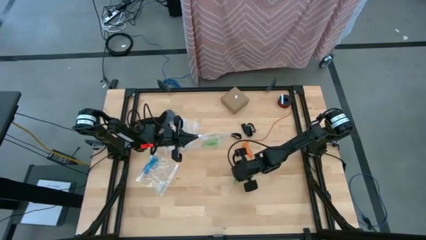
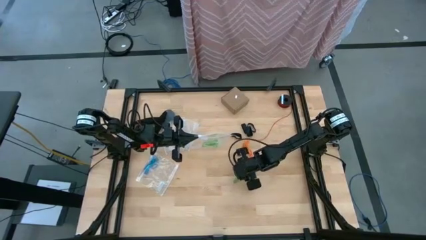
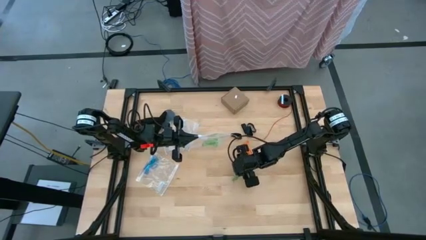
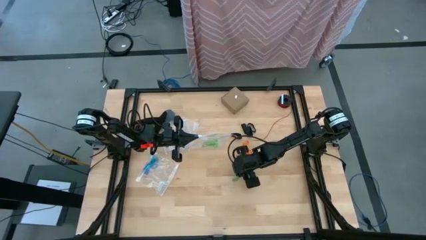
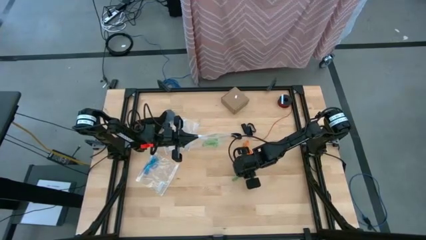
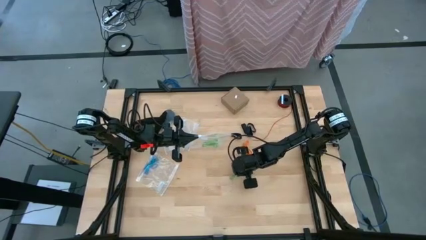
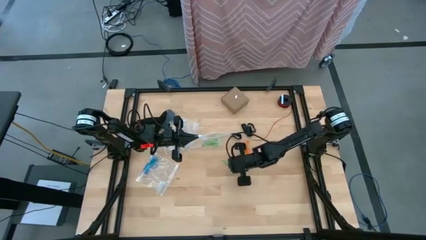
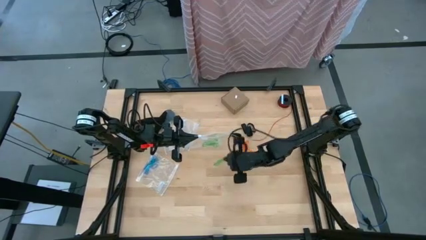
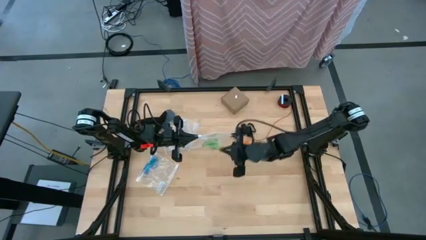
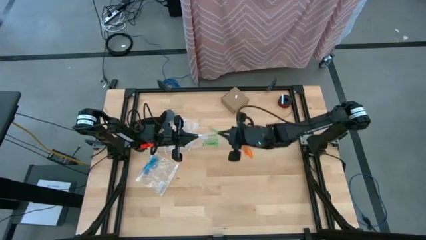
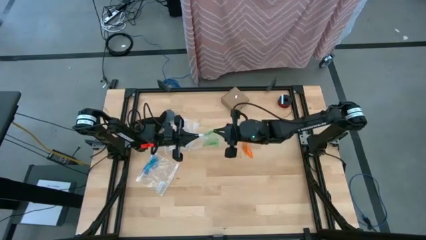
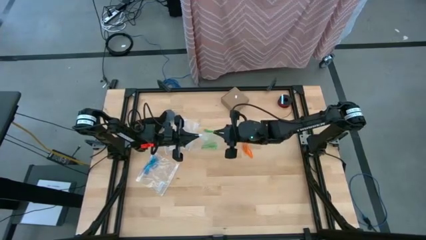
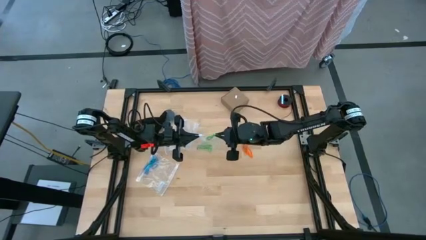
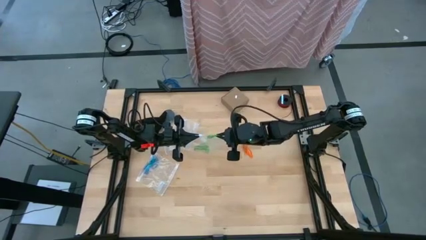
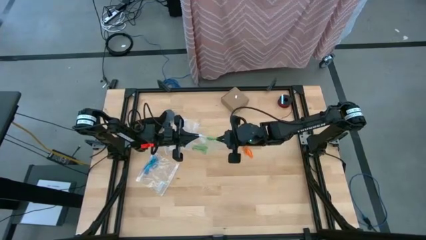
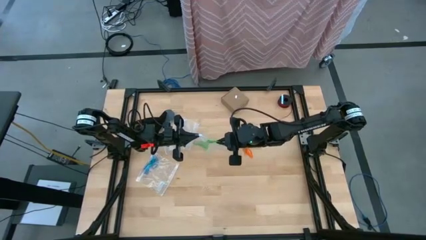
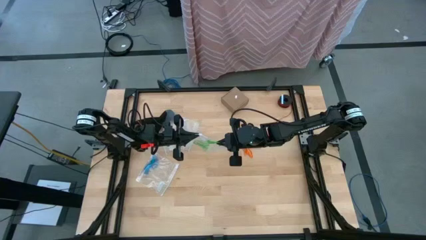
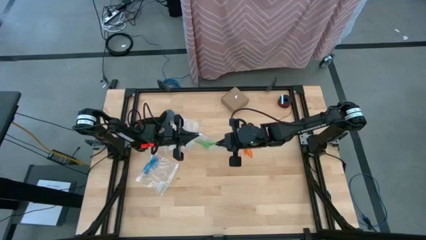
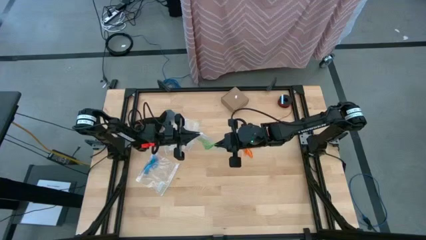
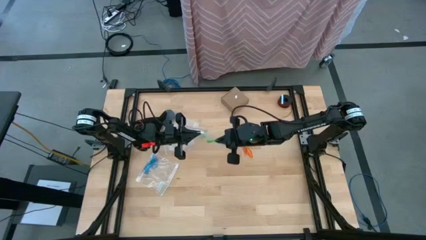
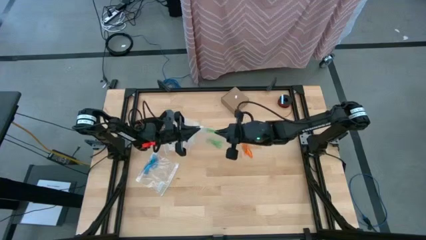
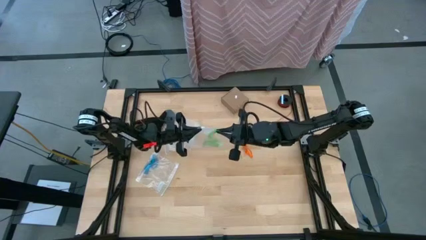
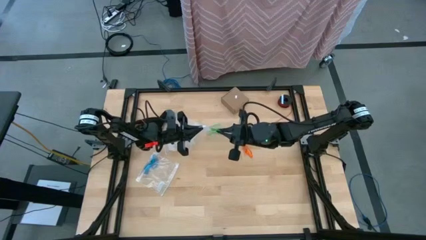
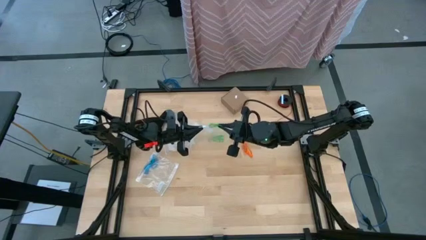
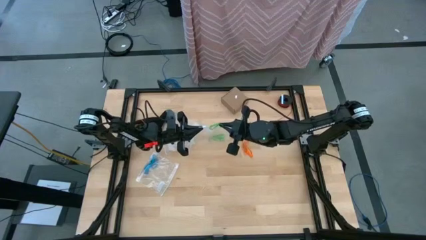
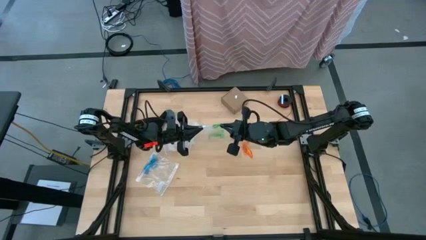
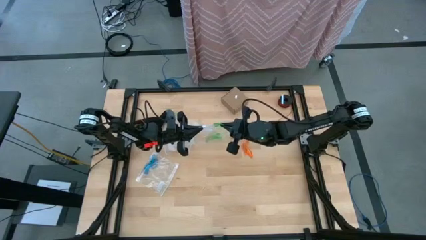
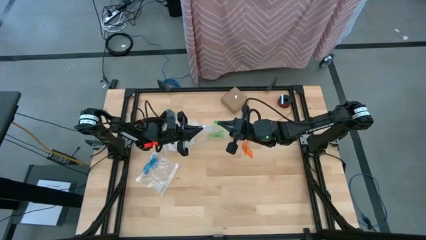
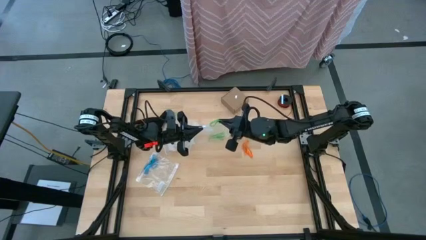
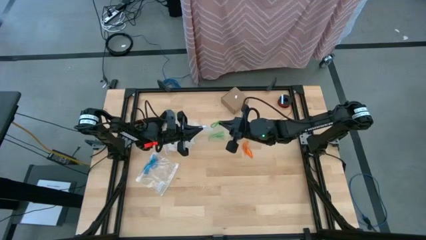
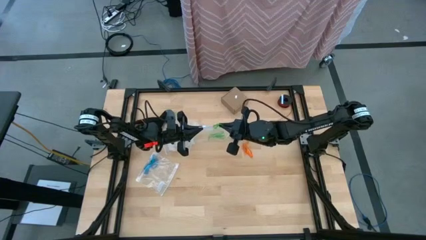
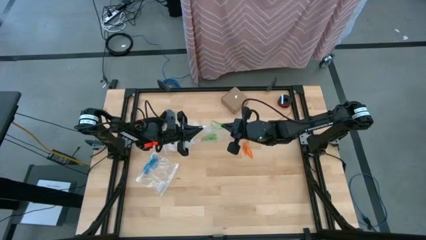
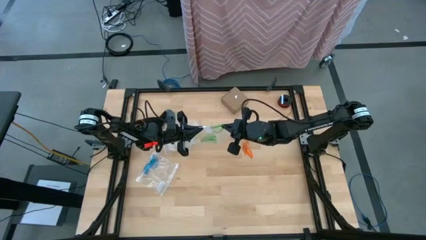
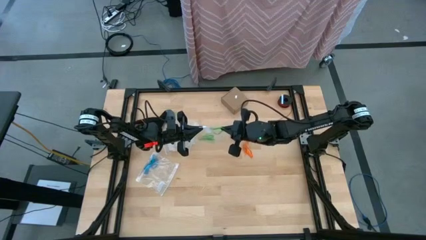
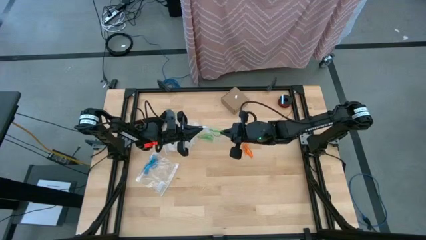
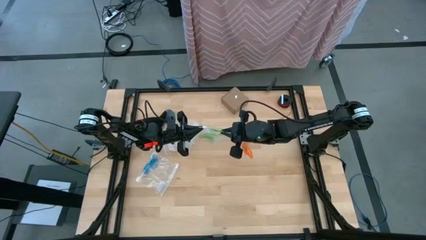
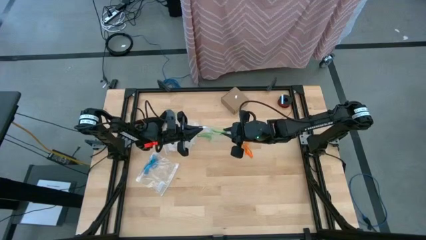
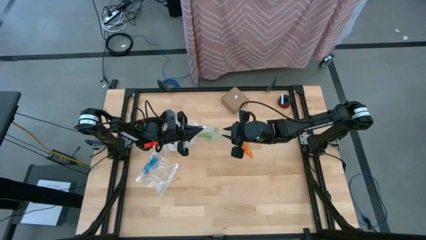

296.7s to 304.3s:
Task: Sort rubber bands
Put the green rubber band into the transparent zip bag

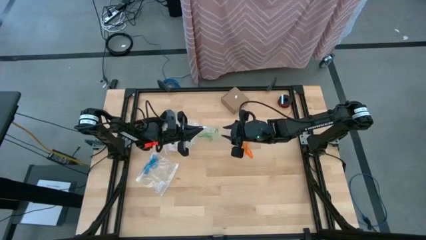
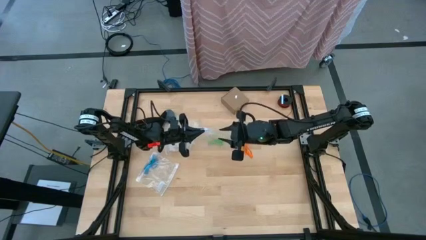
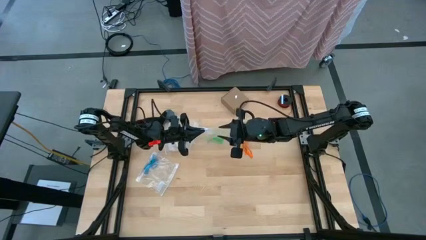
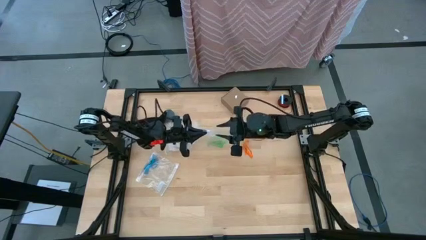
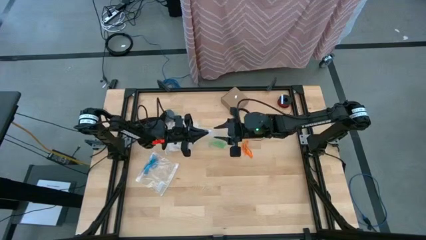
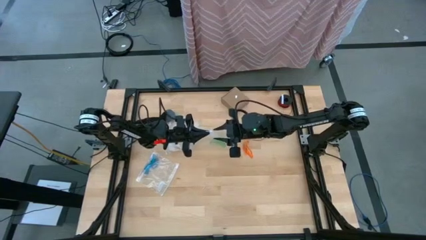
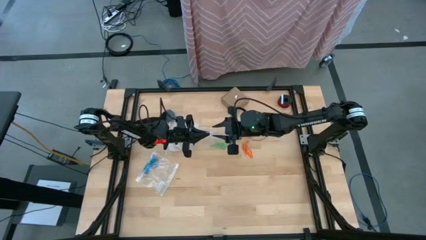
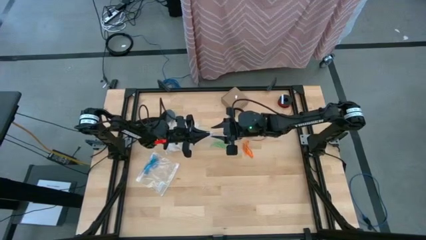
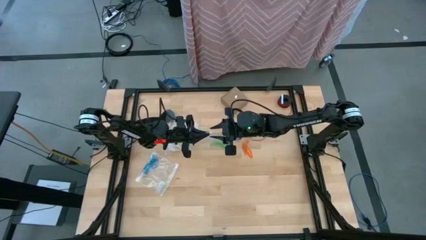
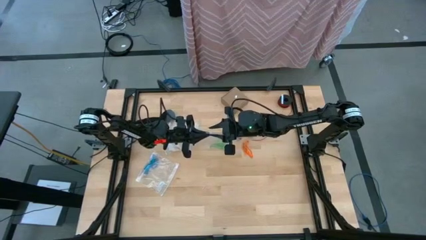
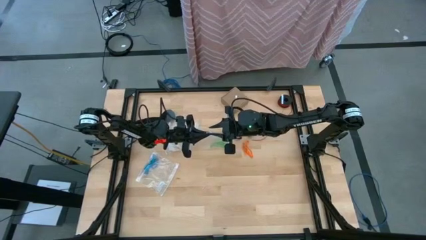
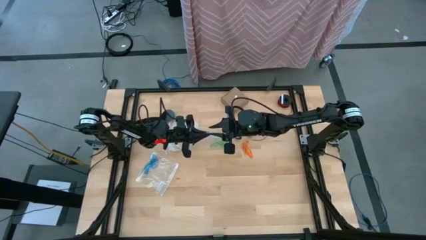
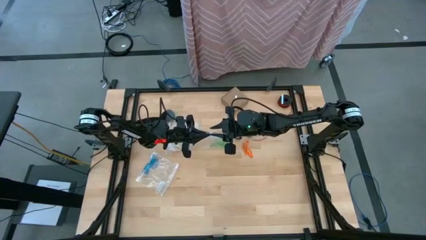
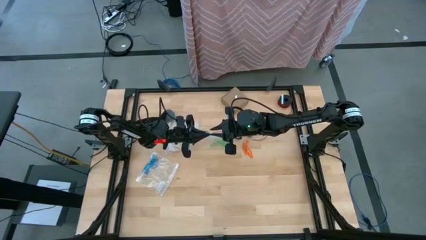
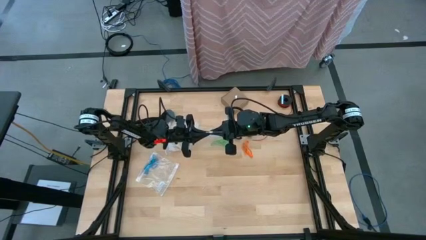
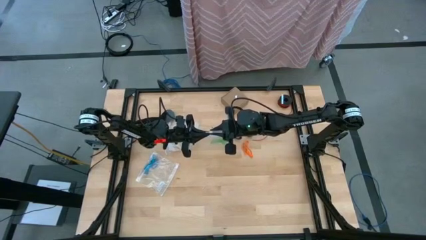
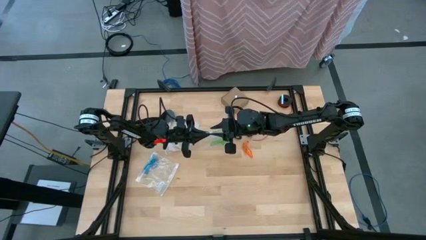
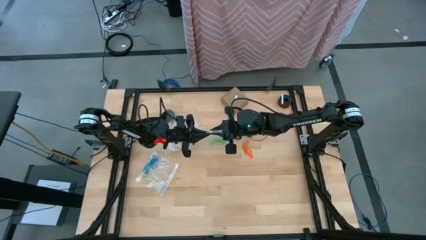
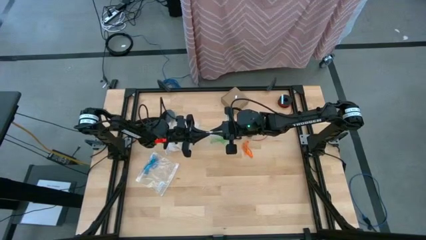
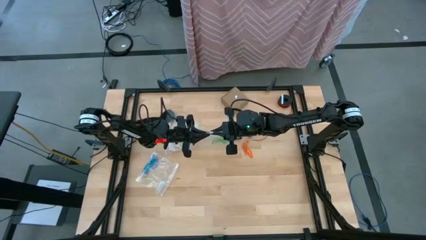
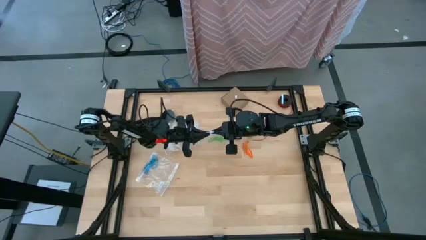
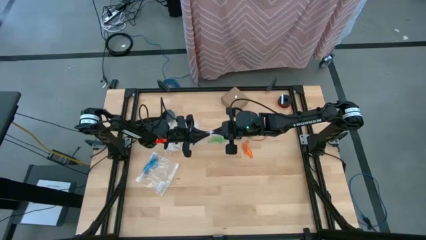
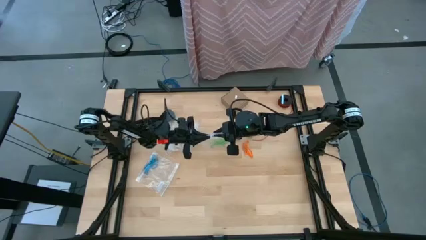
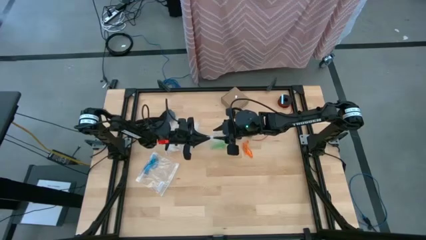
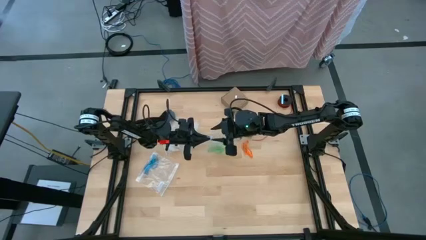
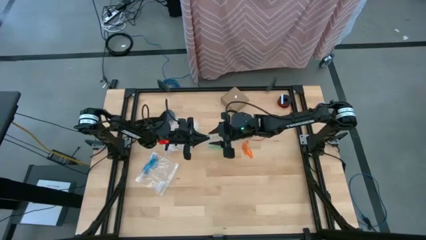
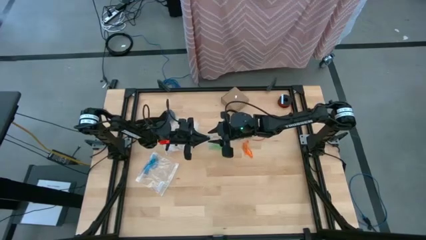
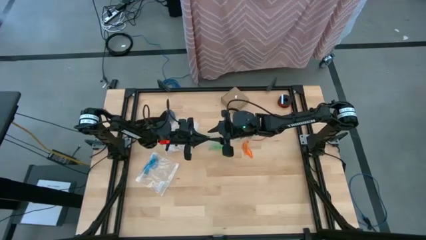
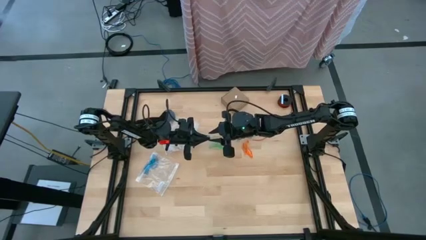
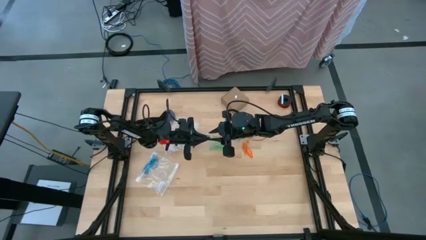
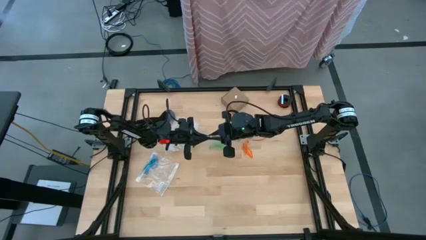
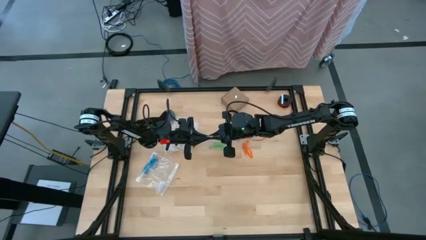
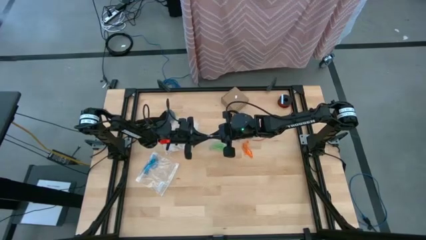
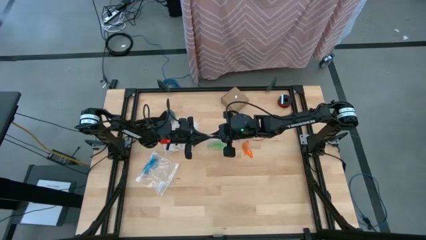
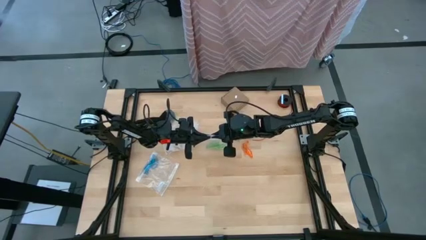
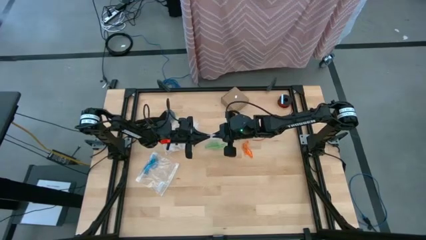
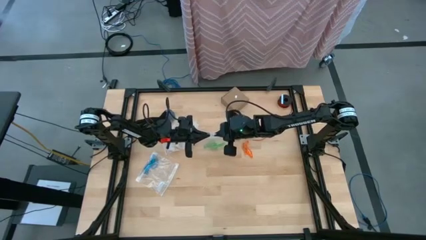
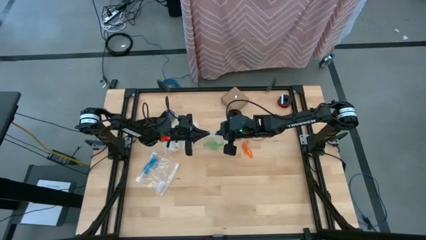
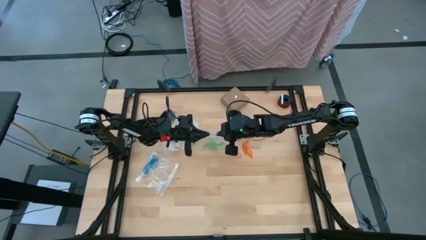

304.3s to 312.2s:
Close the transparent zip bag

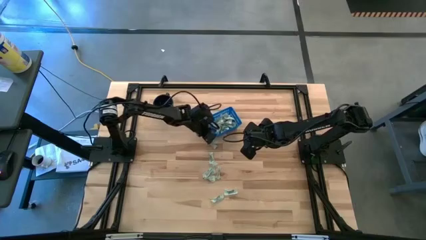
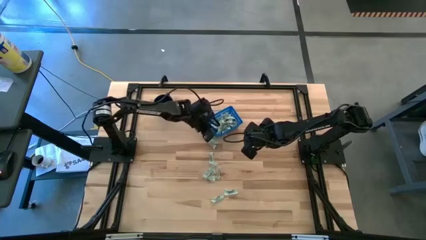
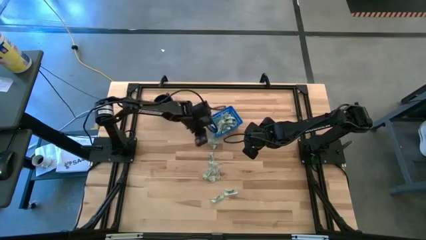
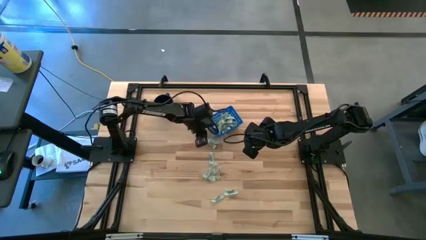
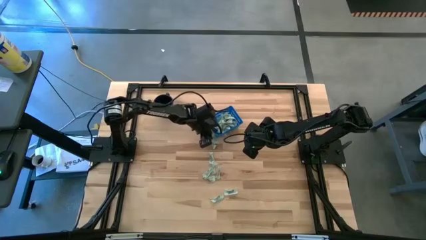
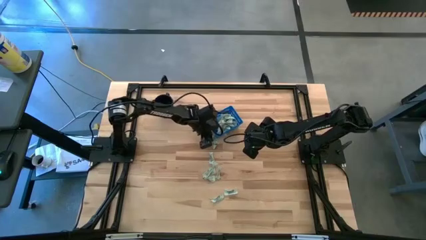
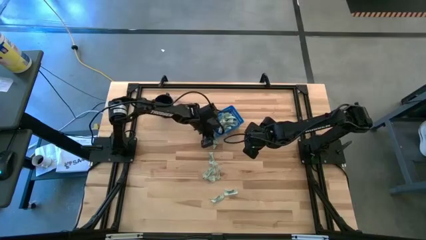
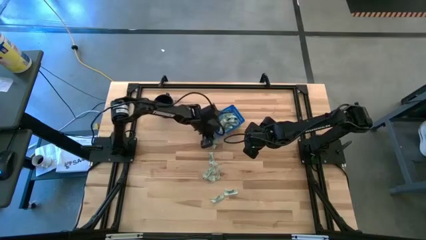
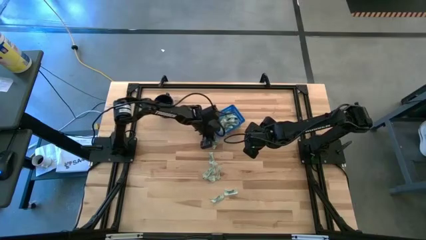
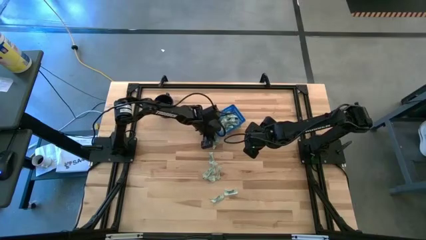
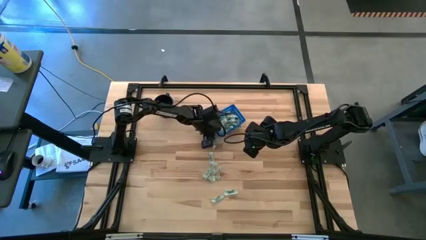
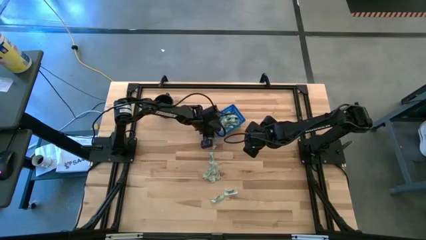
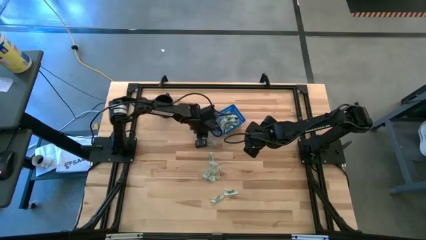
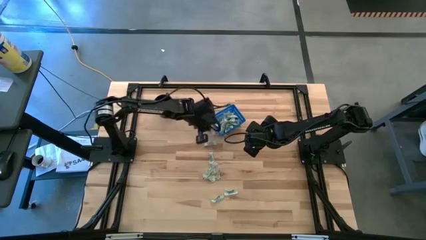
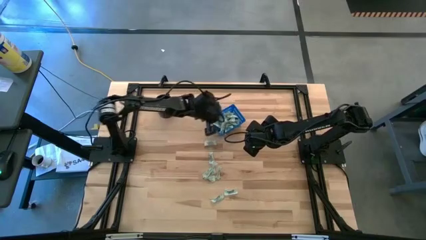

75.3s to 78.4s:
Task: Pick and place Stevia / Truvia into bins
Put the green stevia packet into the blue bin
